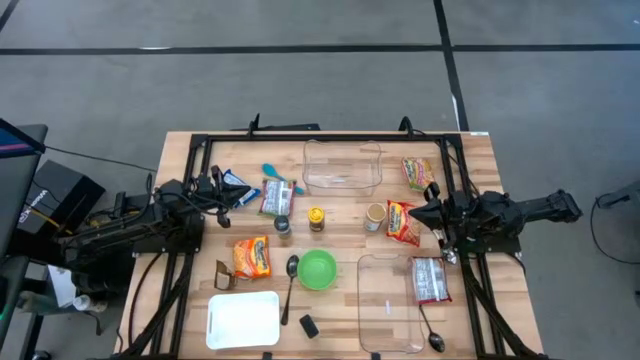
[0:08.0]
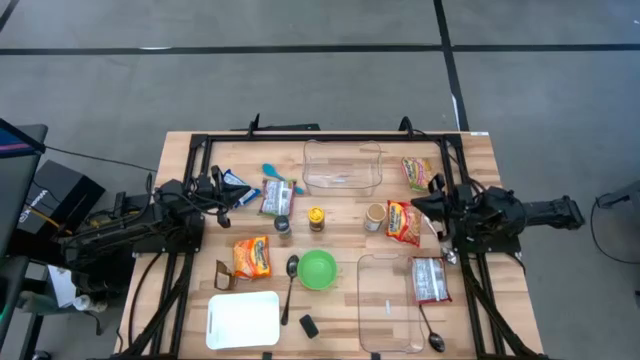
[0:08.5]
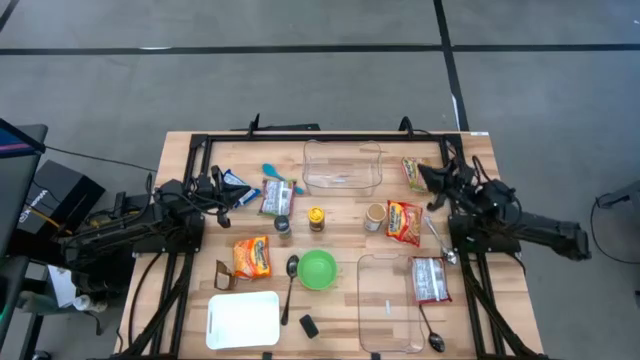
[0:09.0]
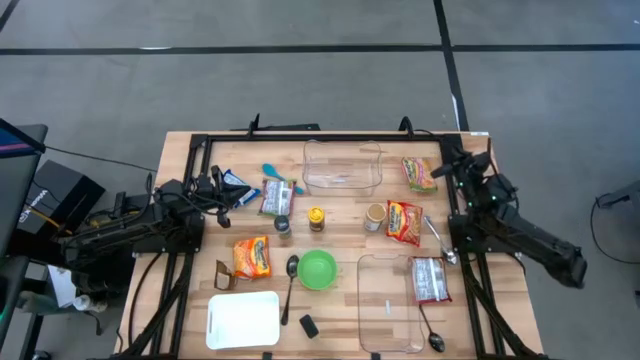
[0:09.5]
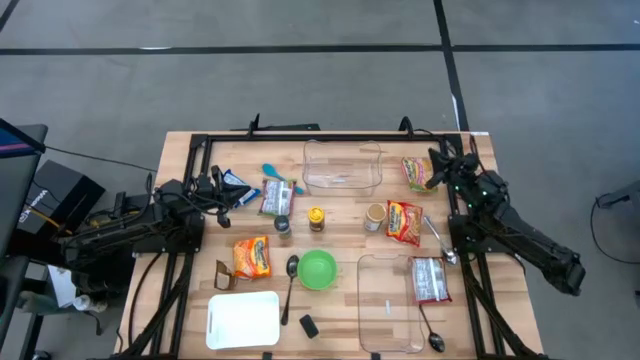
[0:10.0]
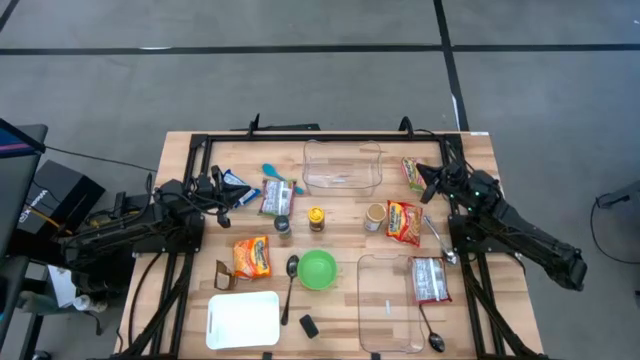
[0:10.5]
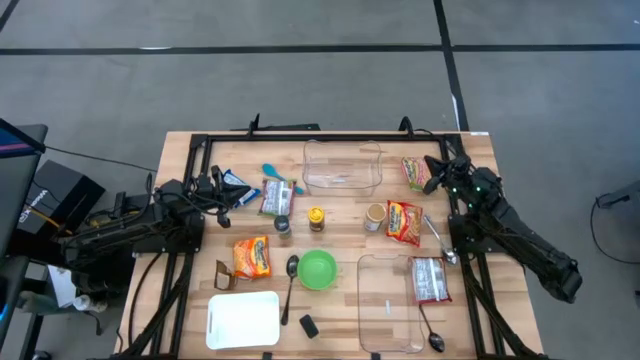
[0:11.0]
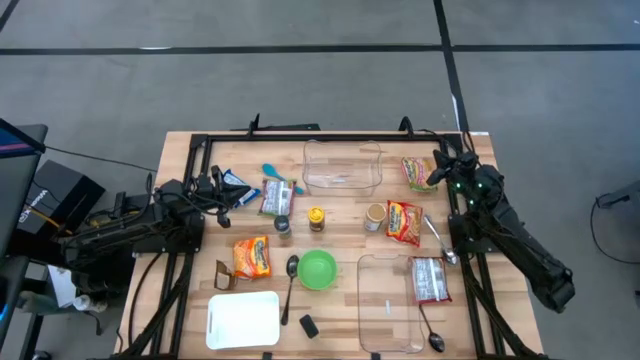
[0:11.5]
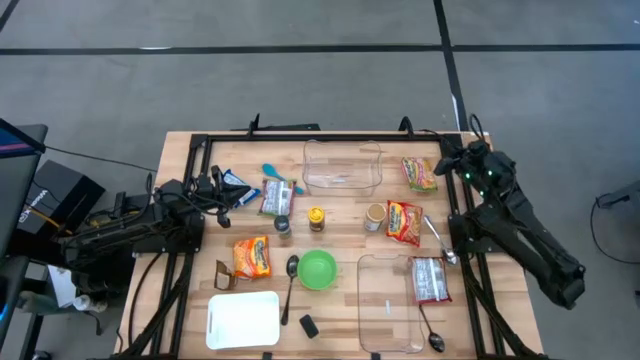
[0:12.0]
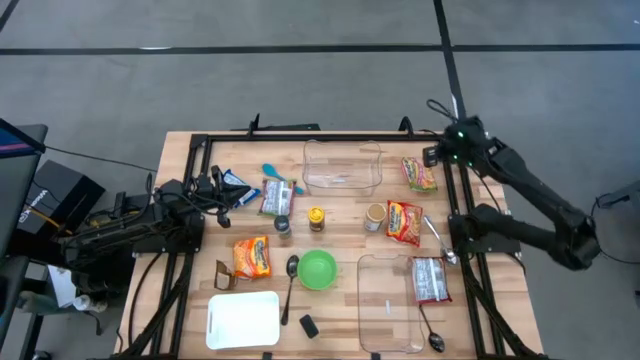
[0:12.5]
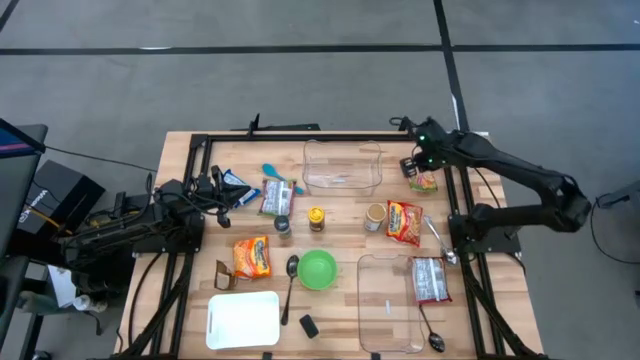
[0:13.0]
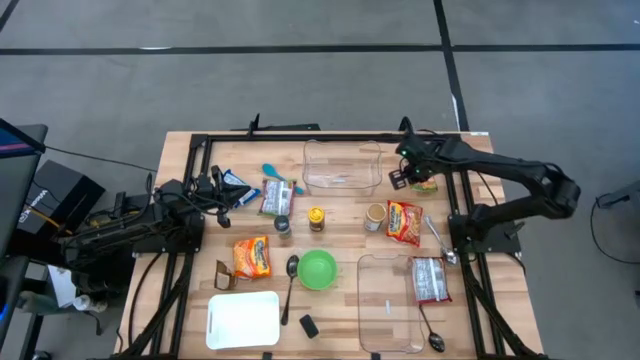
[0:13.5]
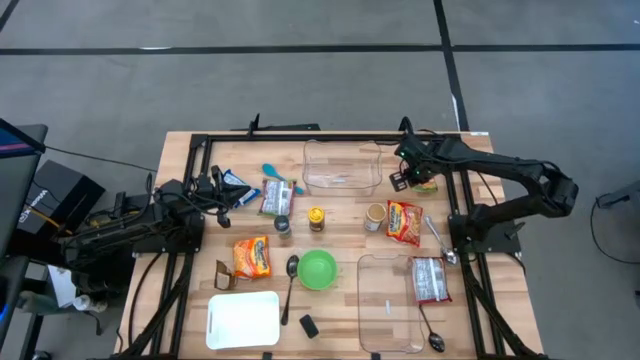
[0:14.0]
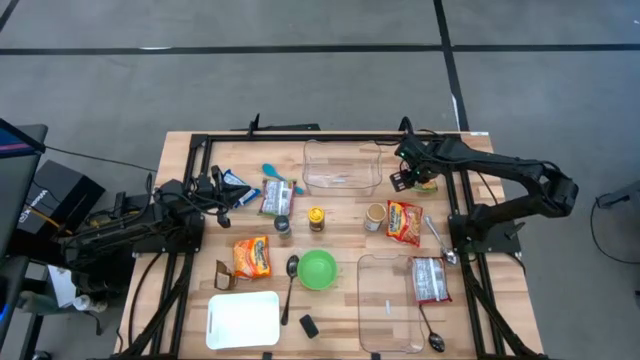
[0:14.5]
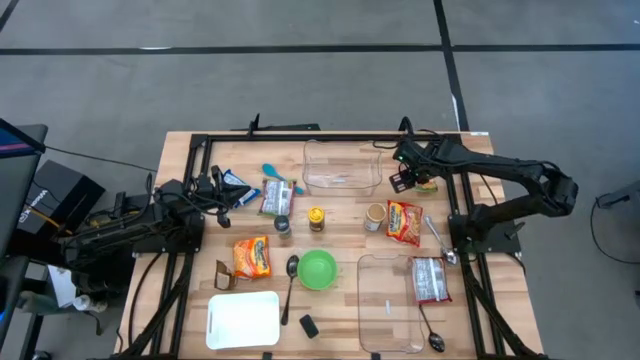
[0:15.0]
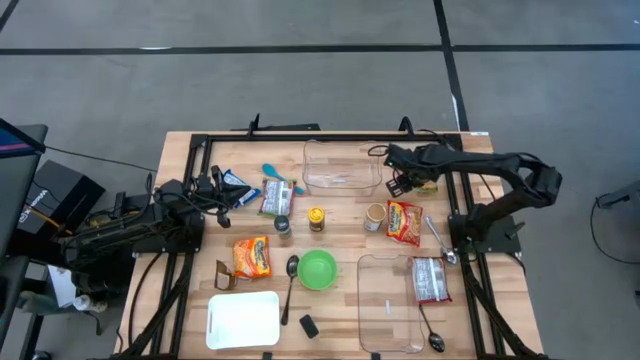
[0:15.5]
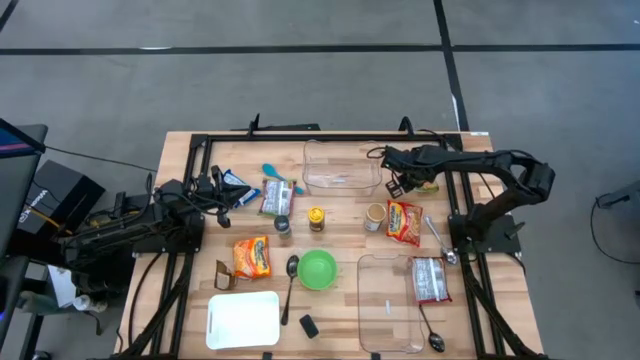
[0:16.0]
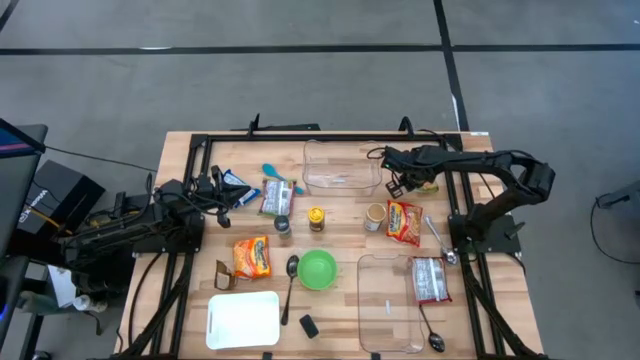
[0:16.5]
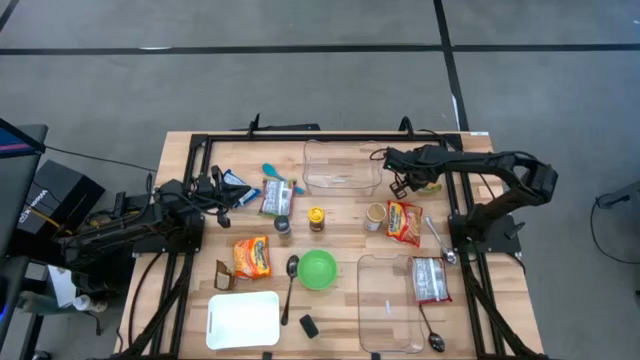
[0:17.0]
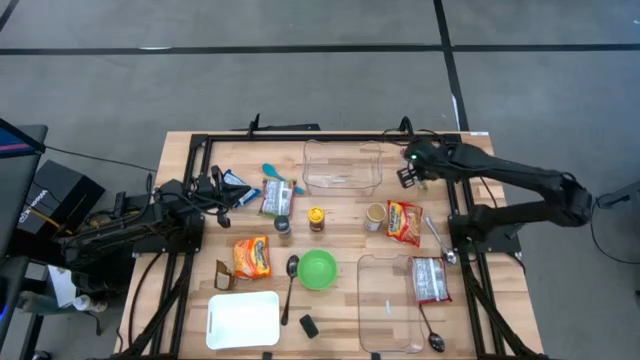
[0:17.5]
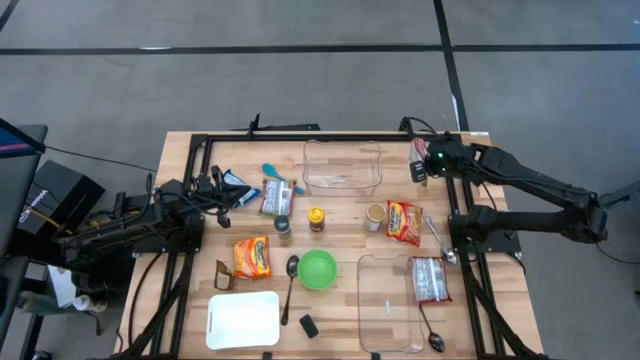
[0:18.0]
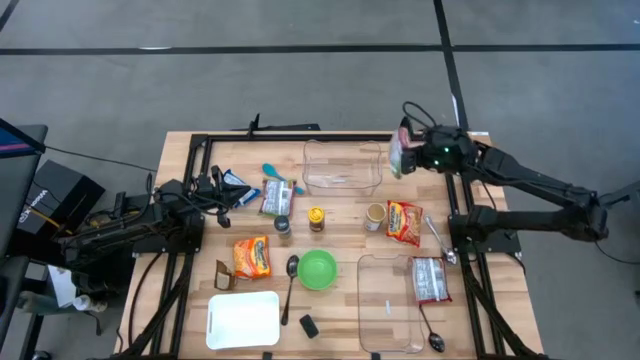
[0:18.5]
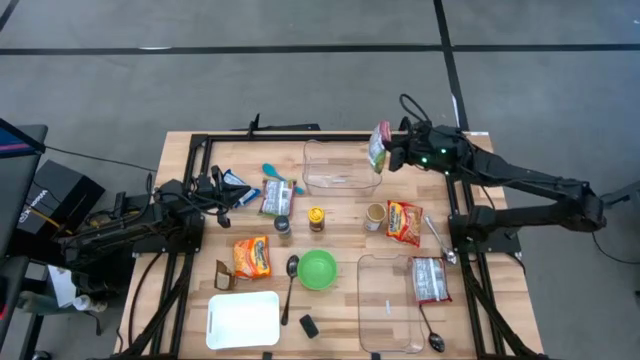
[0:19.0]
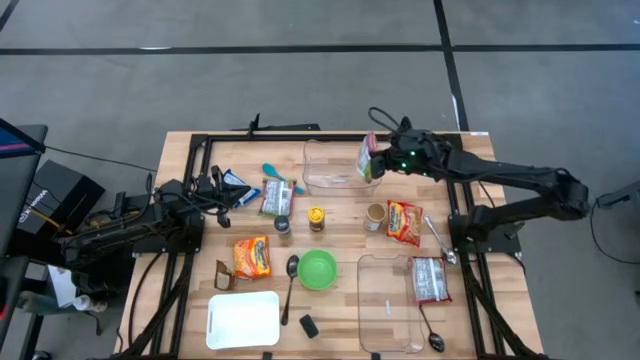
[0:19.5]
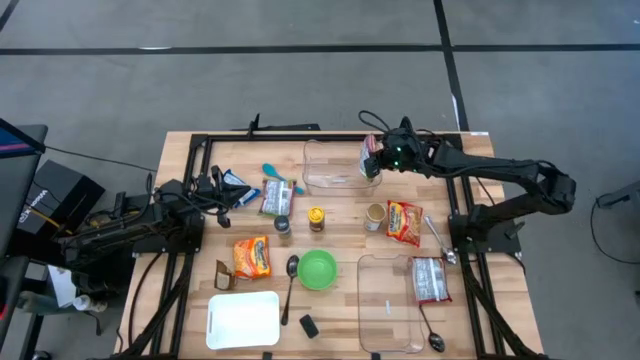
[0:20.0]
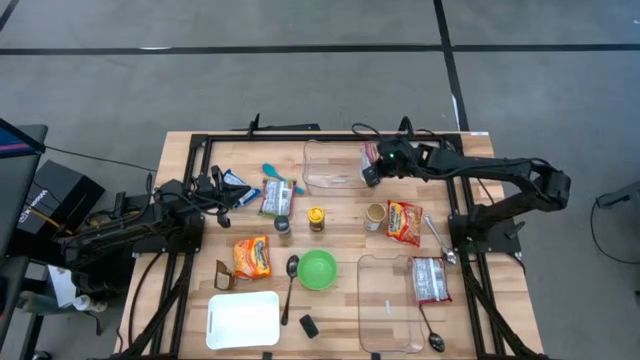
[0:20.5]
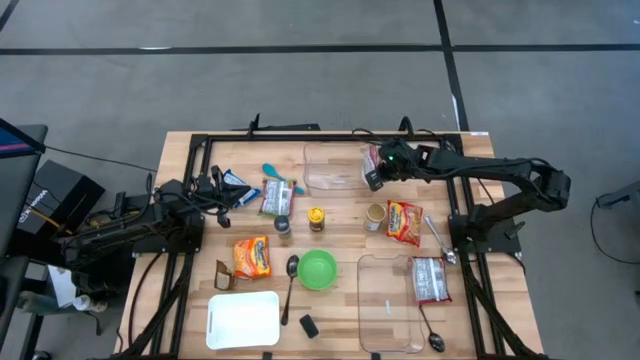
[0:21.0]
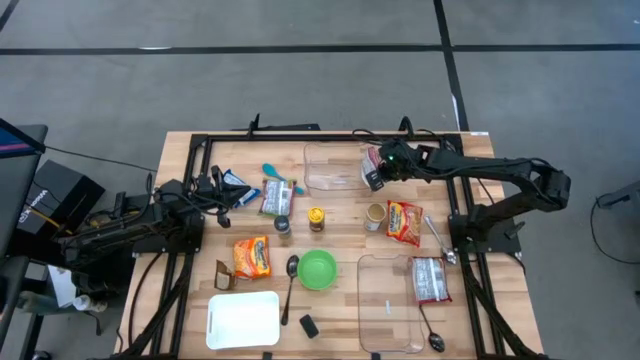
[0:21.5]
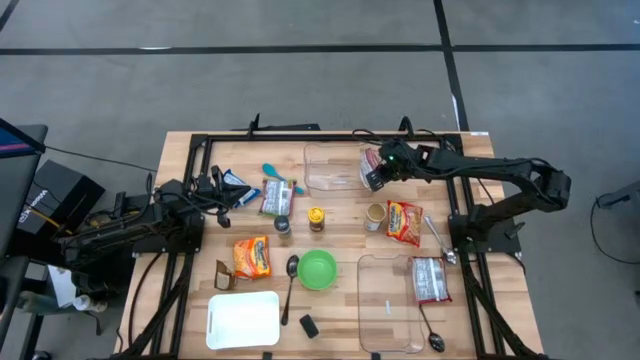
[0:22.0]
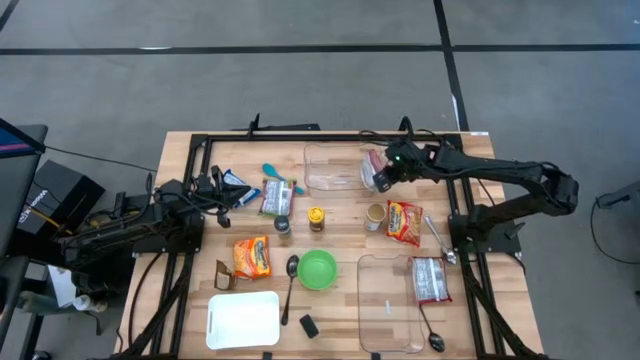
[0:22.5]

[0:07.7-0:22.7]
Task: Pick & Place Food Item
Put the right green noodle pack into the top transparent bin

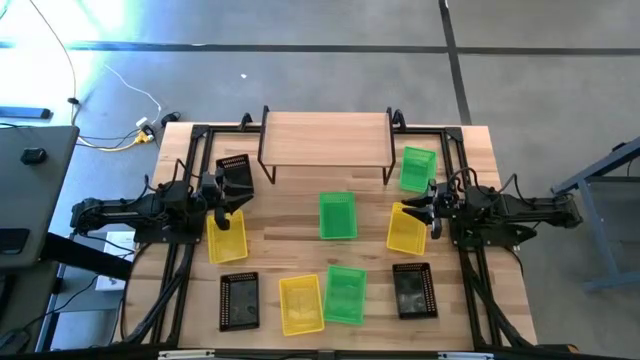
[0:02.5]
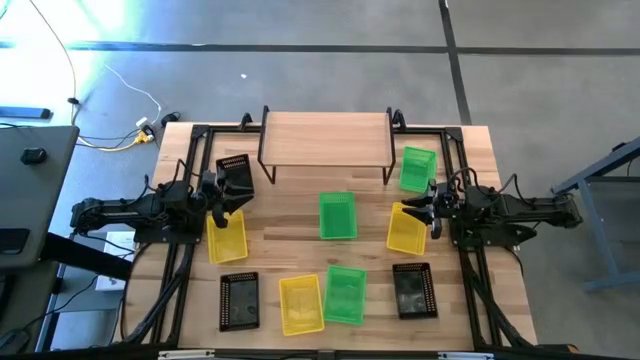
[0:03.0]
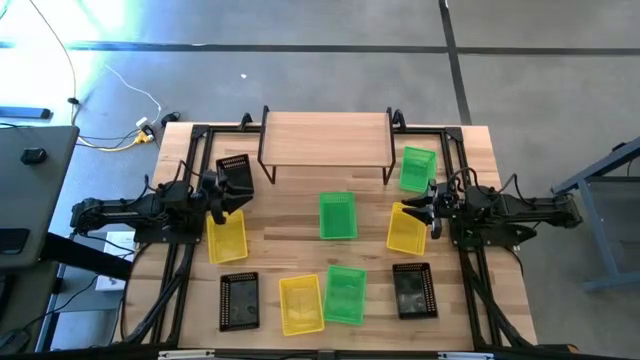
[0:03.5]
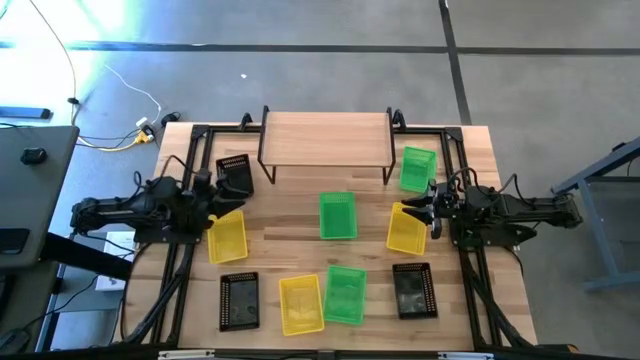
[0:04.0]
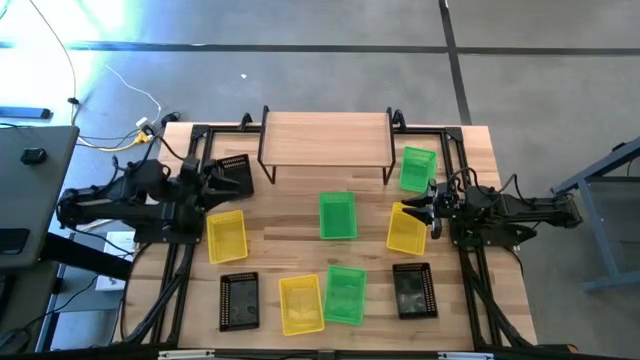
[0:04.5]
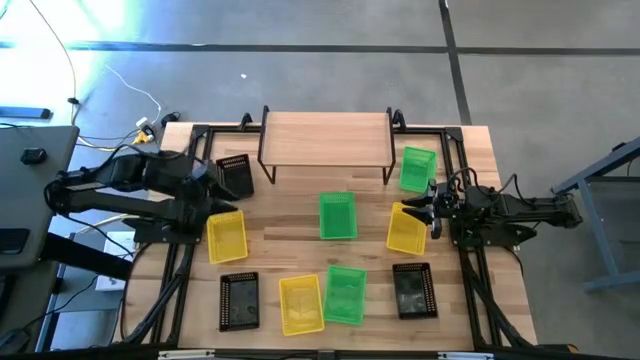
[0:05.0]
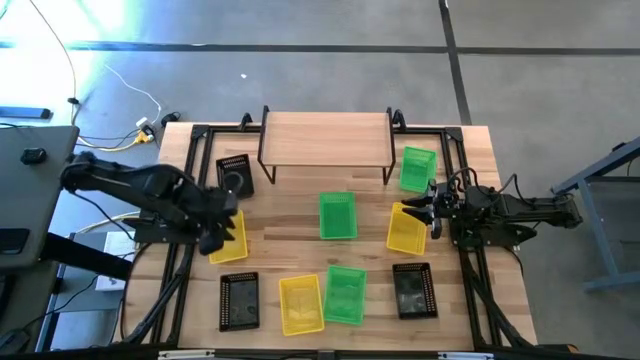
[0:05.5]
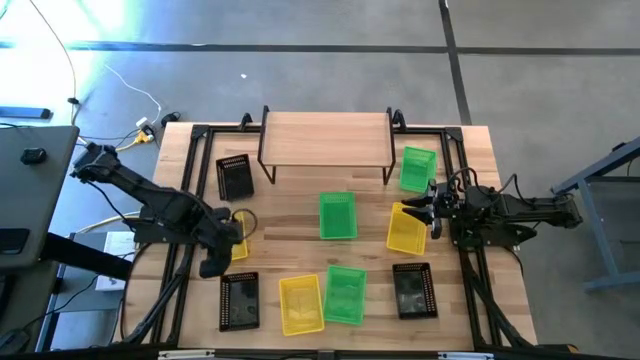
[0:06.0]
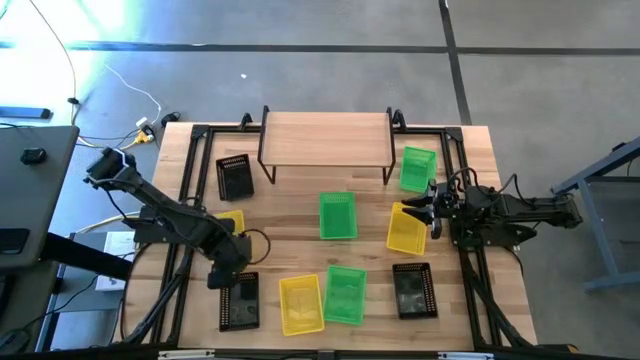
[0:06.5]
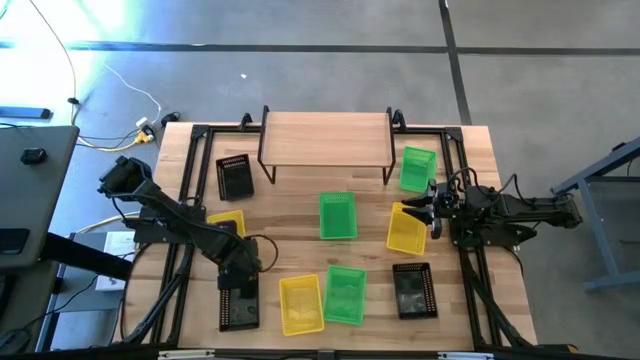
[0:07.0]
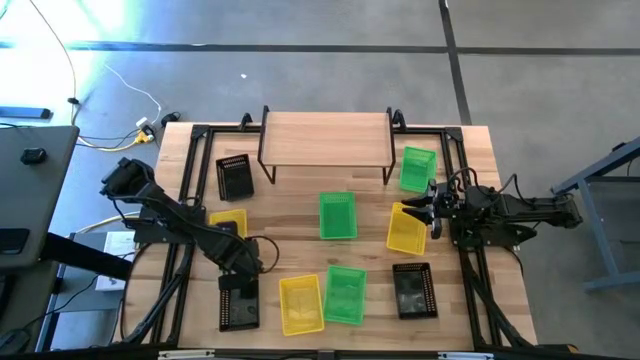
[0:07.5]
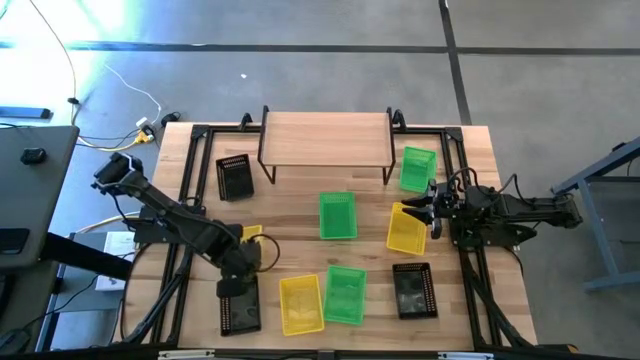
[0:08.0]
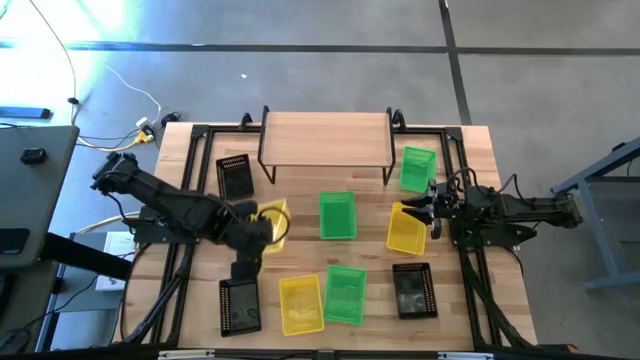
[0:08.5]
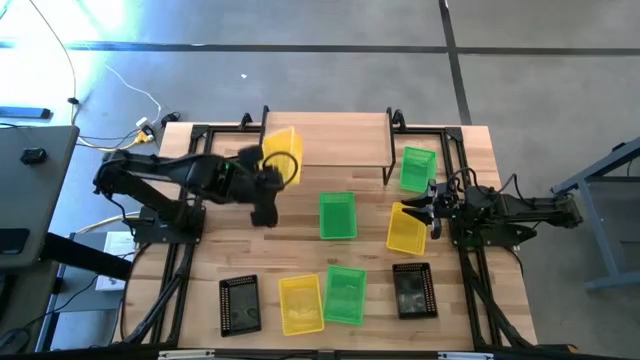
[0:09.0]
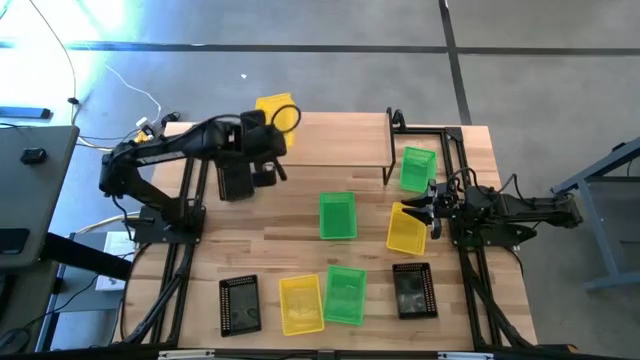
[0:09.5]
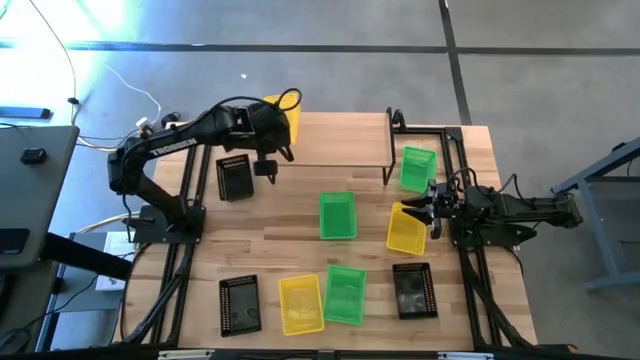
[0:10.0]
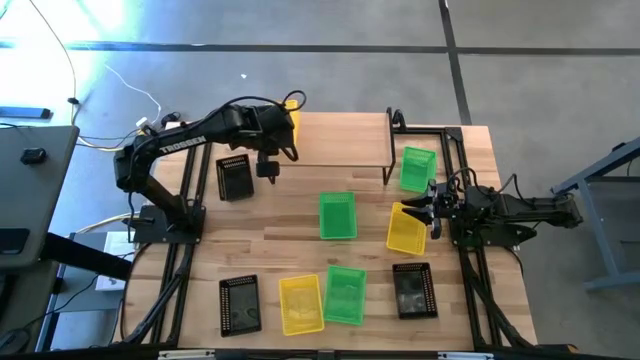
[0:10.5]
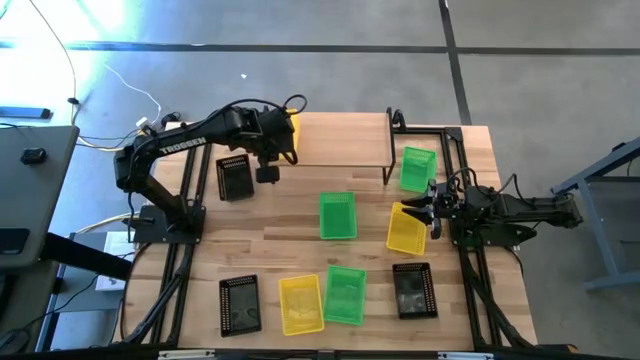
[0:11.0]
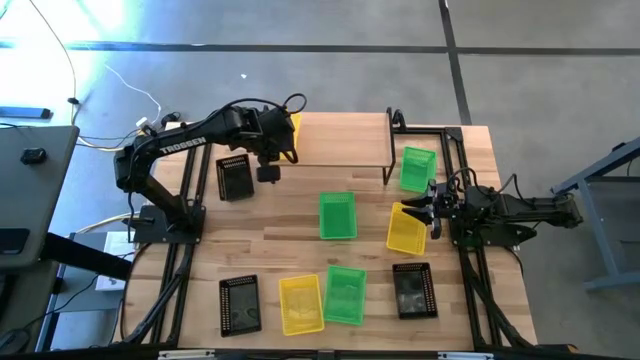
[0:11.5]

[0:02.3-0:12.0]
Task: Stack baskets on shelf by color
Put the top left yellow bin on the shelf
